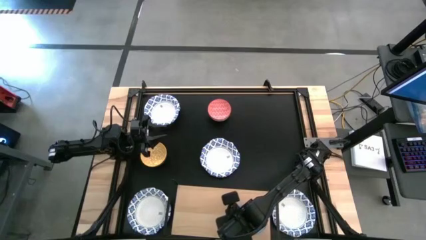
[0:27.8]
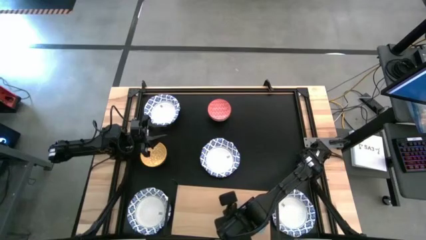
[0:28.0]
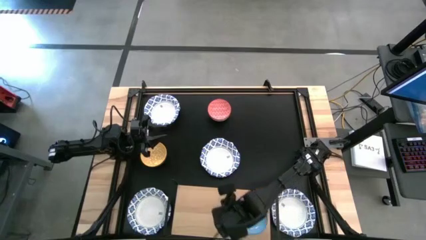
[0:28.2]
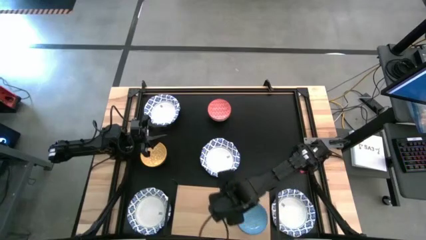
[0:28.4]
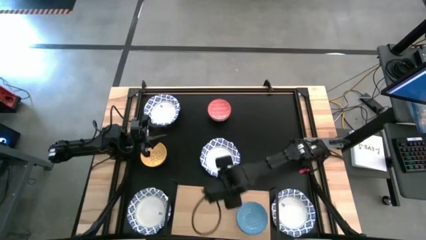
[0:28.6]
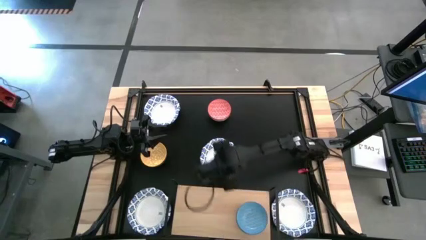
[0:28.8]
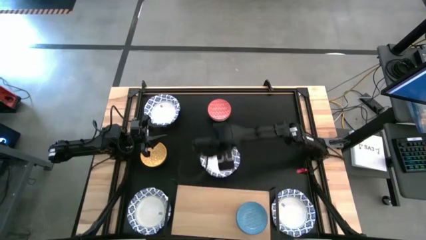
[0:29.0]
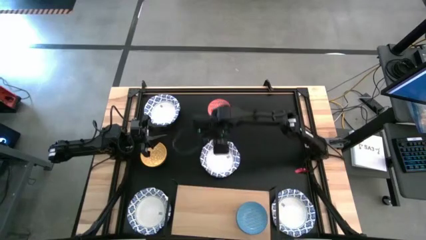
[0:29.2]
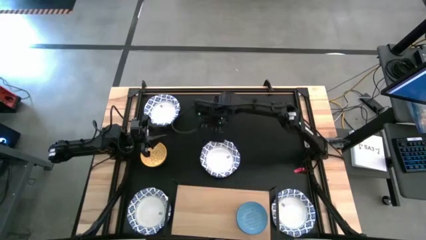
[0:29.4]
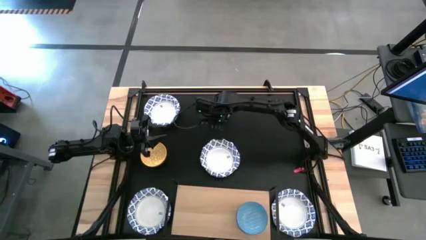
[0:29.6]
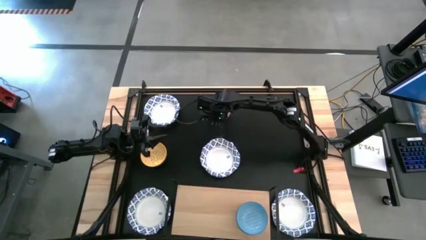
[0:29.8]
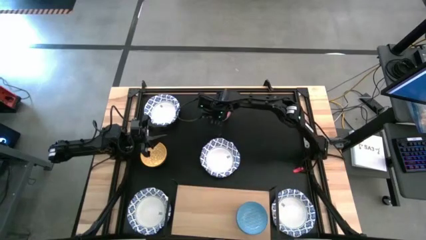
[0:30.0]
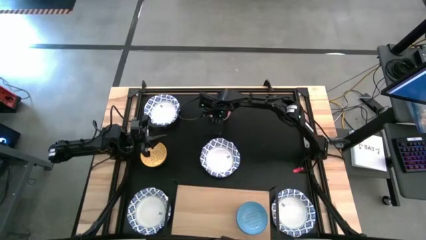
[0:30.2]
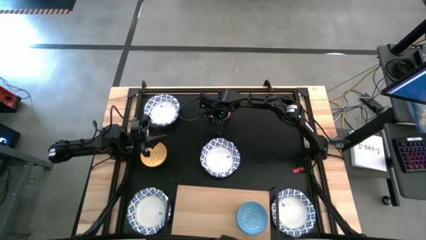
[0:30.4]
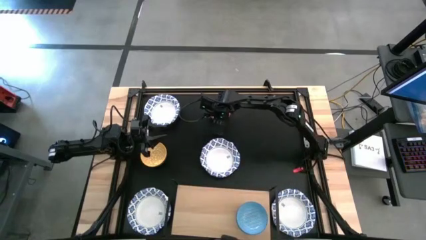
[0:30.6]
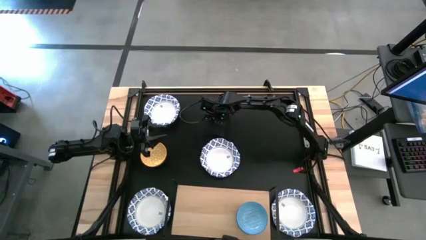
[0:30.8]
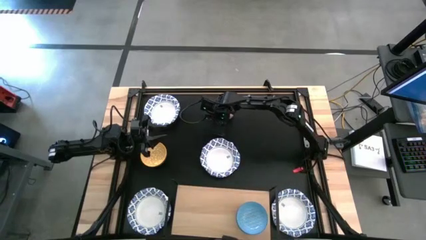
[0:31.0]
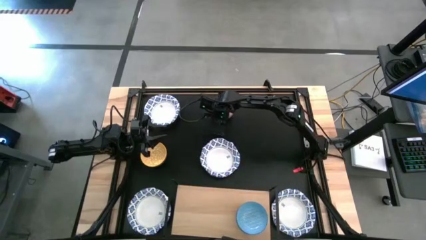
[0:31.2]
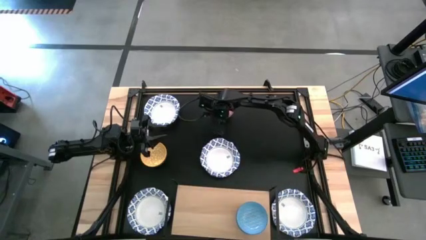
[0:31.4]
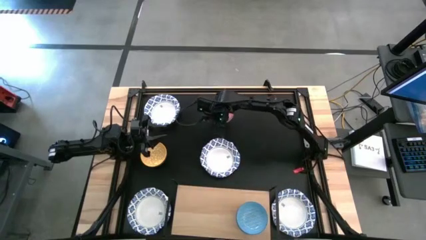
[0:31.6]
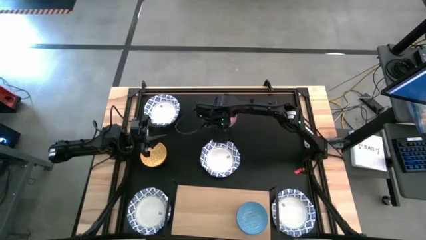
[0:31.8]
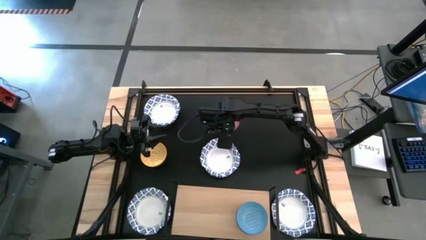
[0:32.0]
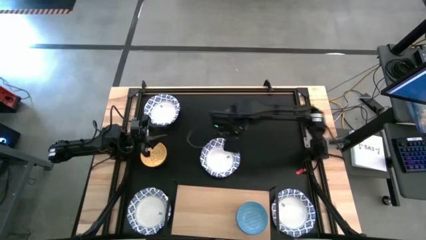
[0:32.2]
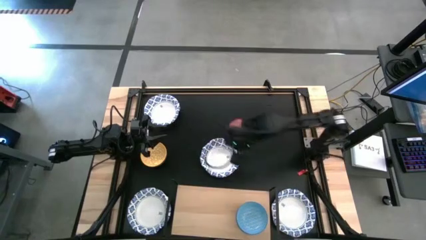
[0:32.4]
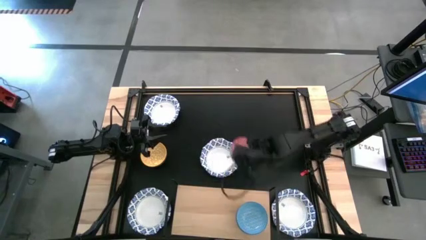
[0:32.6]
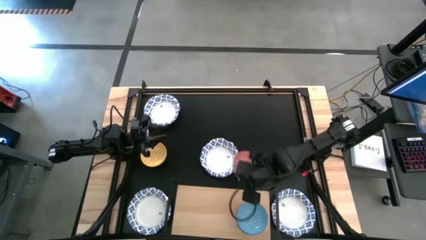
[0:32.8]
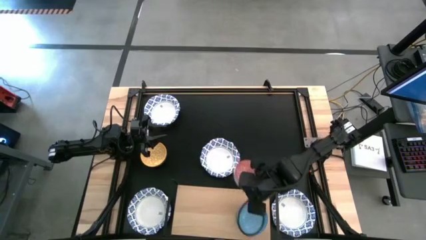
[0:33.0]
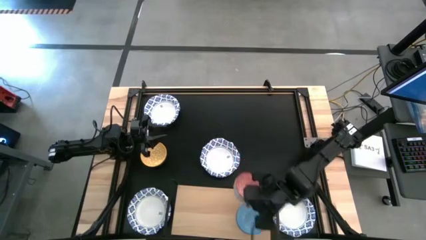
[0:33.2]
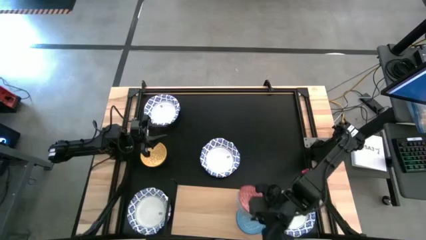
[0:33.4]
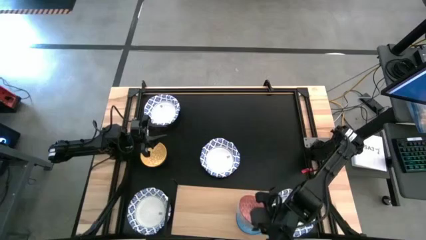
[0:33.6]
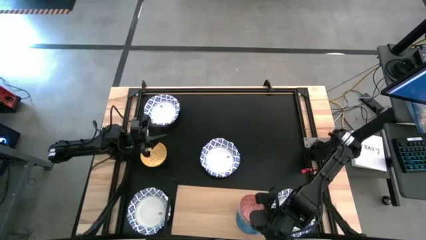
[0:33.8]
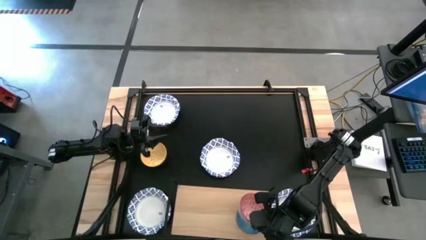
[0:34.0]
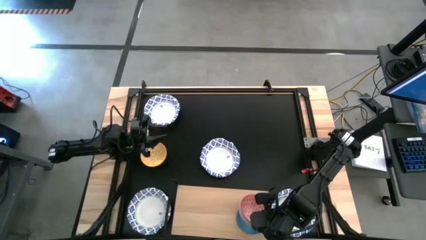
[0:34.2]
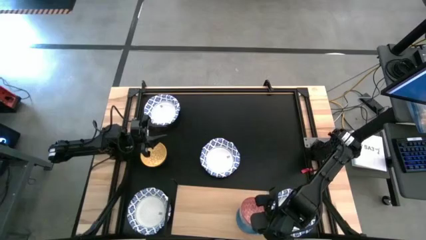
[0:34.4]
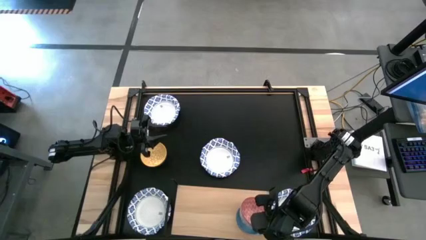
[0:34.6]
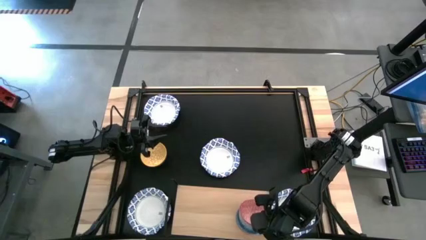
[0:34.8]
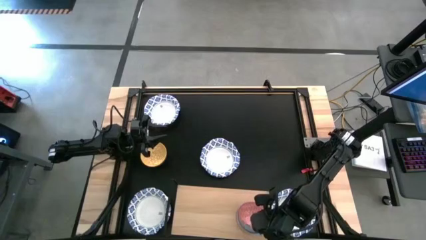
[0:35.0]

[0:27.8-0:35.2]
Task: Place and stack bowls onto a shelf
Stack the small red bowl on top of the small light blue bowl on the shelf

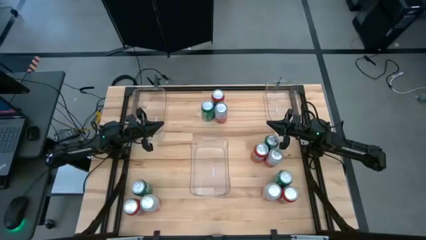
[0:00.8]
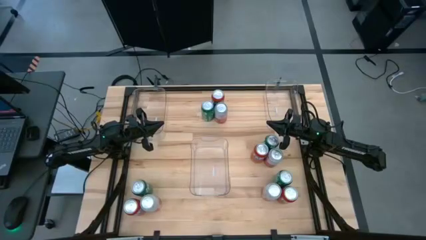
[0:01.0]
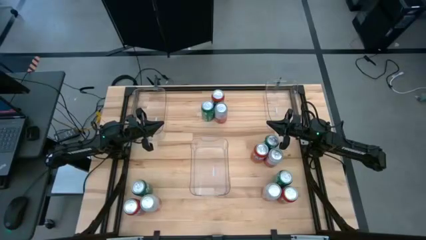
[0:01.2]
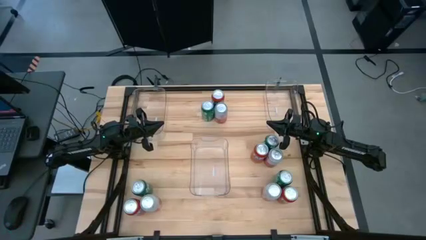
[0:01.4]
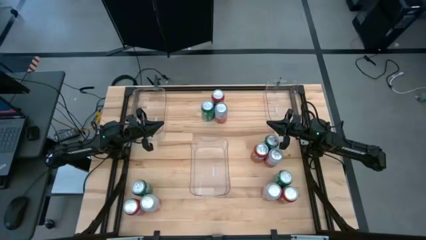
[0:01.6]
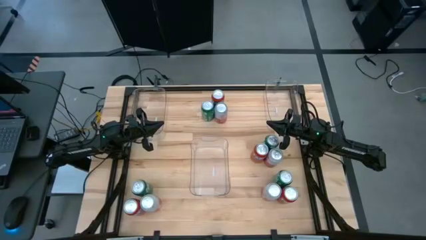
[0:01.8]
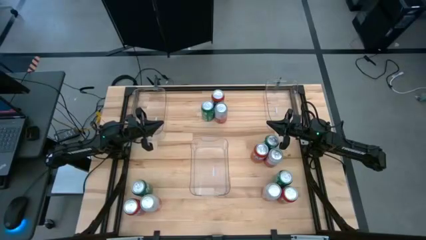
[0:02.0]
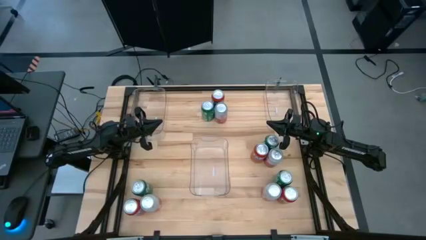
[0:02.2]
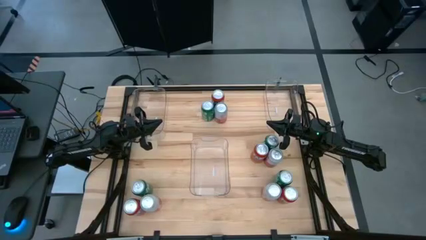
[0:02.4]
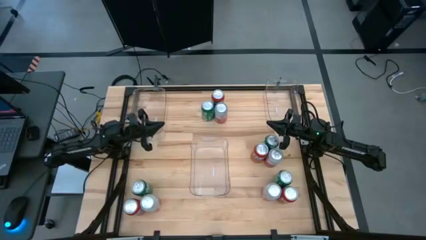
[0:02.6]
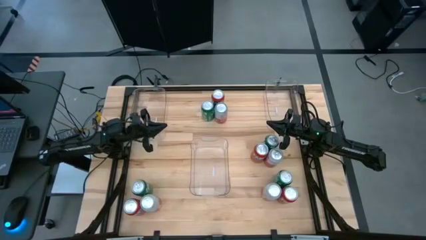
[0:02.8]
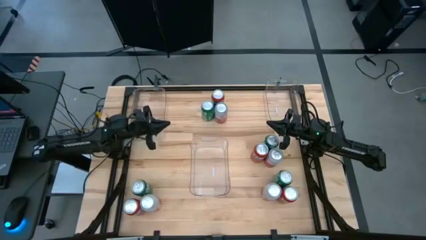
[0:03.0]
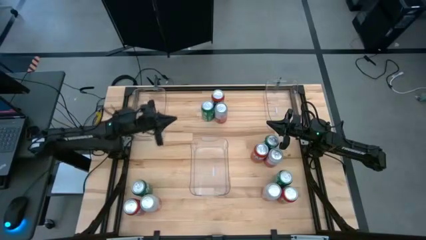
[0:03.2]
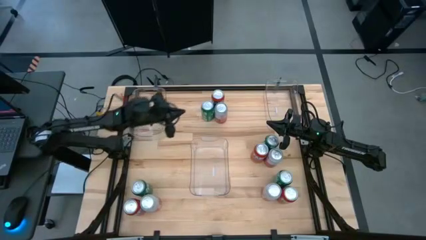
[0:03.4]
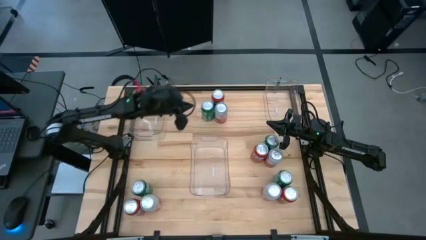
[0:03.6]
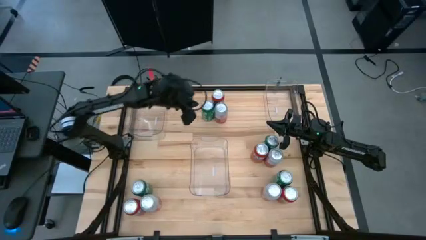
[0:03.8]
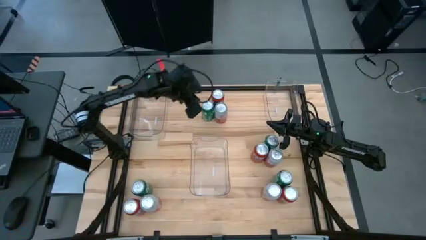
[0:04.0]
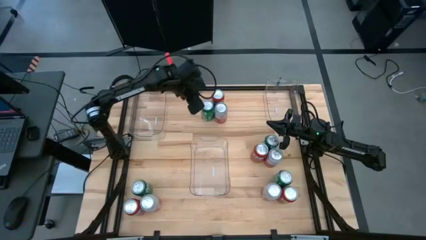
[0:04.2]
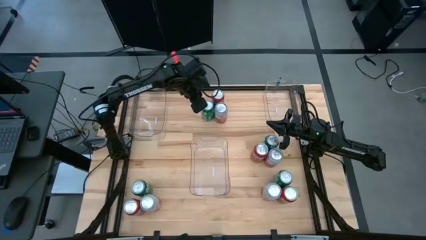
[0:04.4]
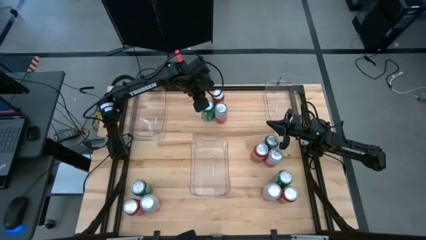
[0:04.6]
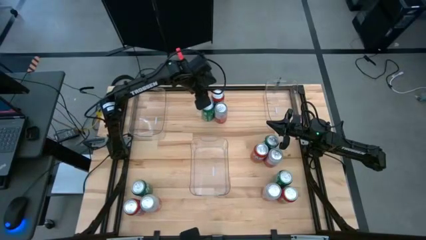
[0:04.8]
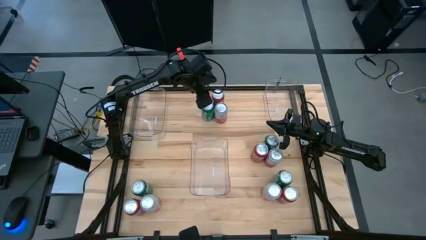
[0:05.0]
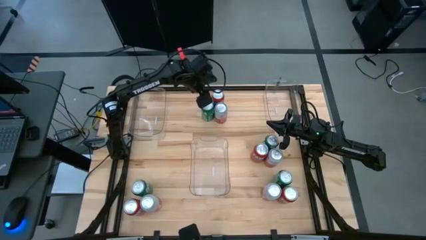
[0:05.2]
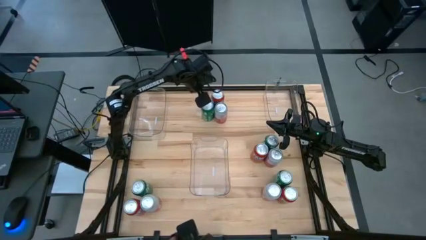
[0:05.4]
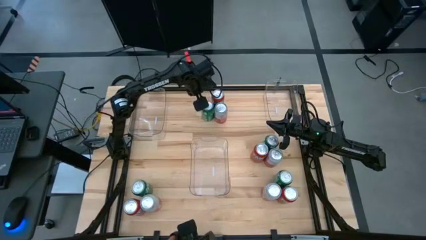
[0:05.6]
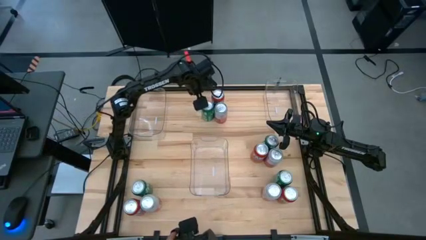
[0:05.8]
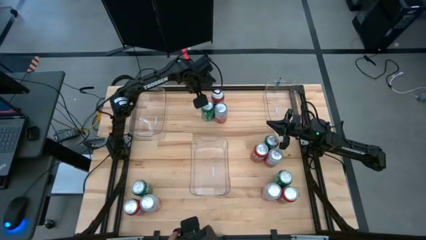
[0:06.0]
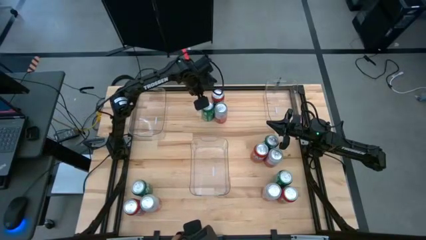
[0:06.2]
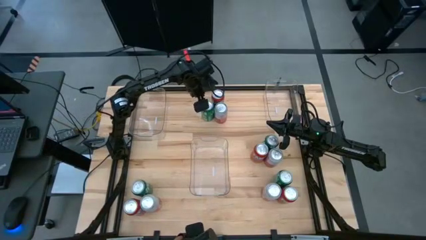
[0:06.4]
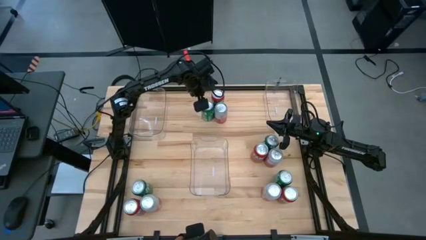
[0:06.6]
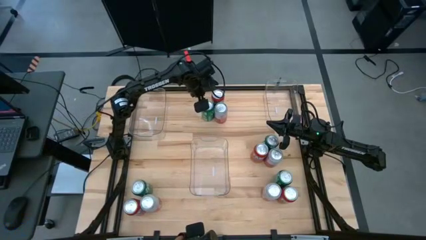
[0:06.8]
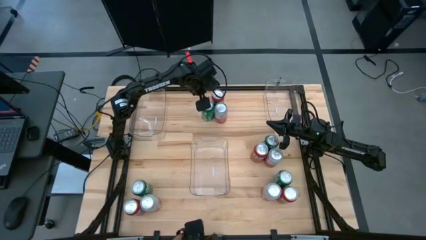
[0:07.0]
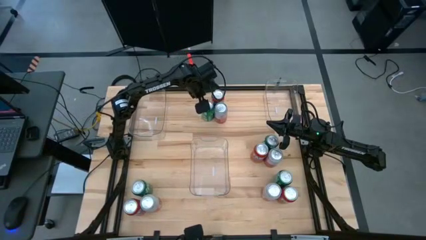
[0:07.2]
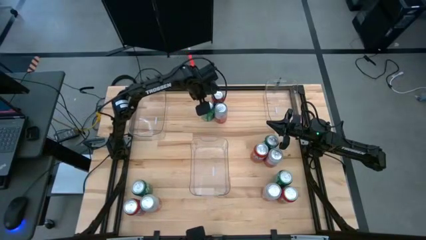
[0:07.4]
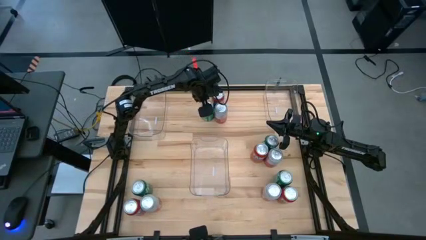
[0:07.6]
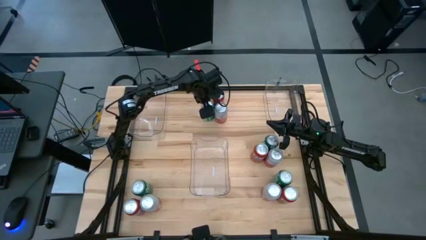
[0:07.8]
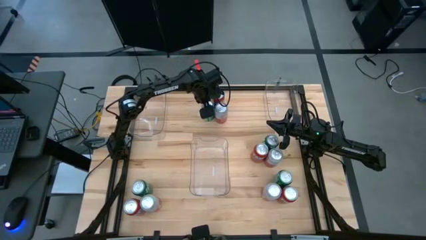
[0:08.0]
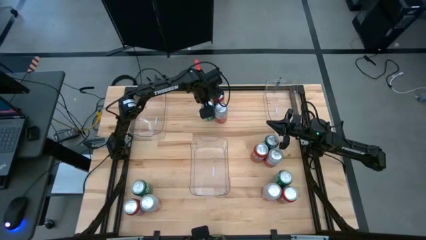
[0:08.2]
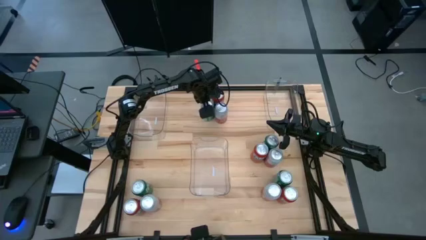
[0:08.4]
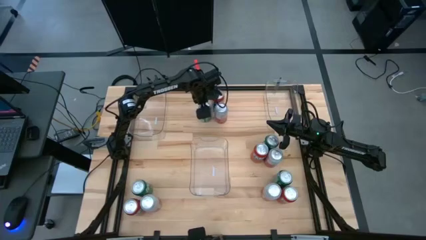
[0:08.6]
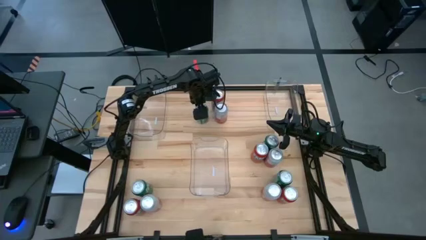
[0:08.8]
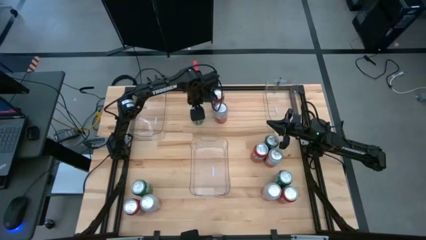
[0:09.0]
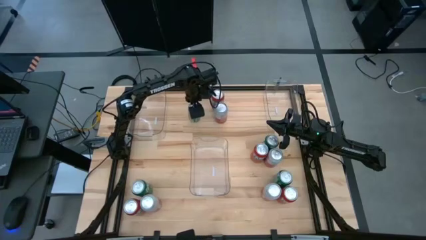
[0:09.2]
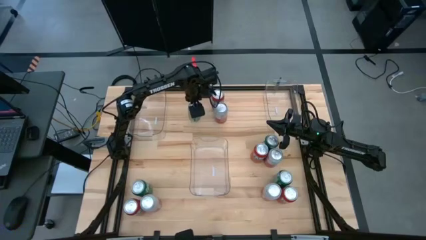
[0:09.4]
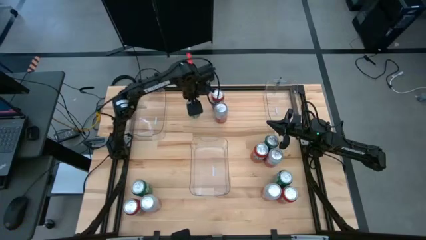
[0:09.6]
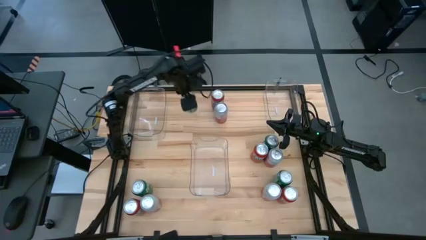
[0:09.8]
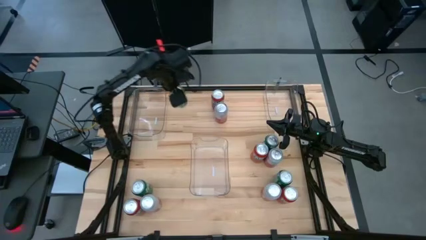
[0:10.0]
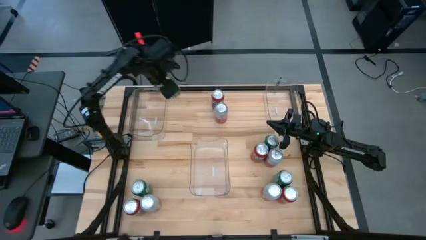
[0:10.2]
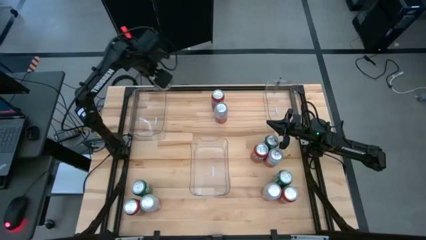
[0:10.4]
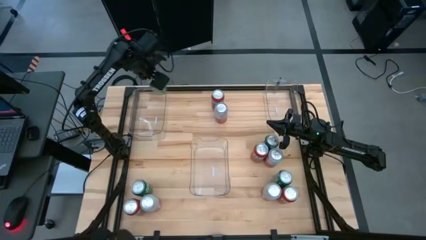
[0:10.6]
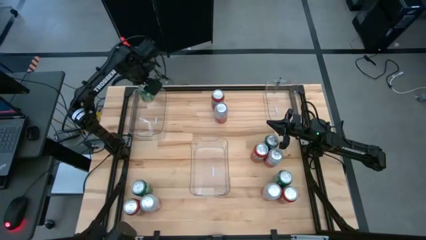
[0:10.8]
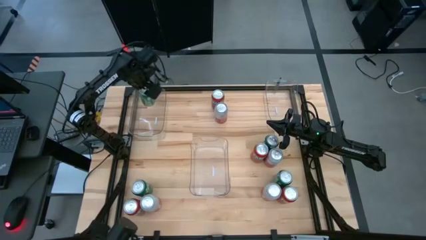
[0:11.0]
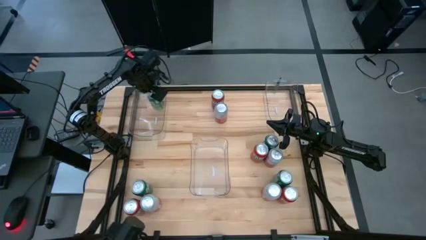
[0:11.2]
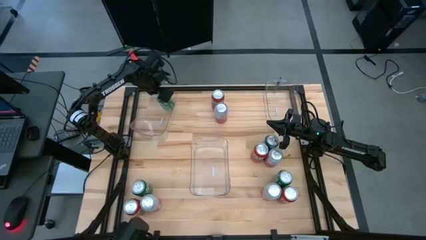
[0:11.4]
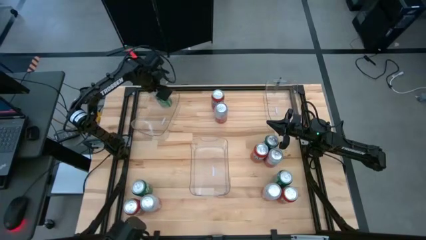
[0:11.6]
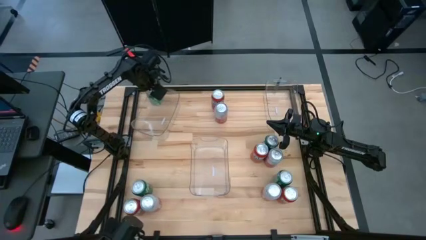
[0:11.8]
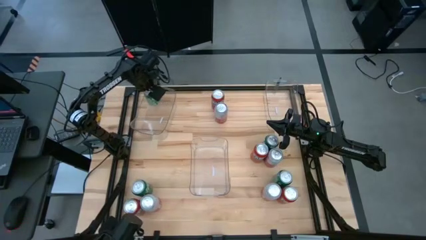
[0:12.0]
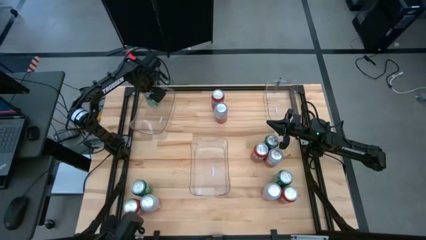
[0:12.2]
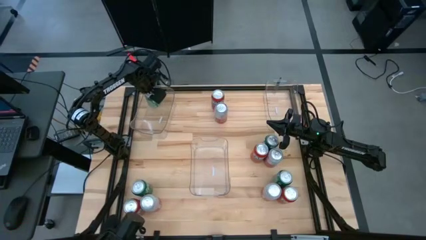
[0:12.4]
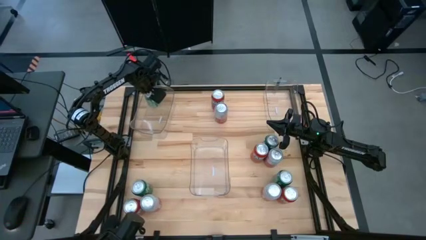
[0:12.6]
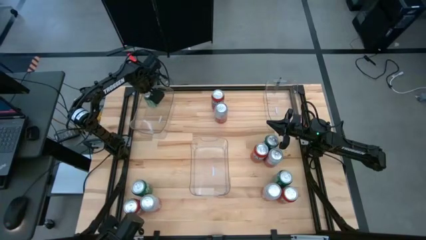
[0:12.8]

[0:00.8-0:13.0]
Task: Sort soda cans
Put the green soda can into the top left transparent bin
